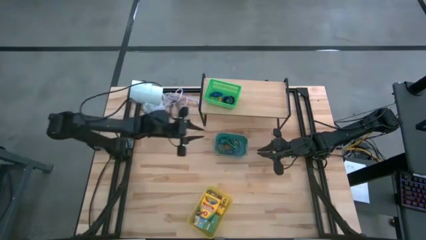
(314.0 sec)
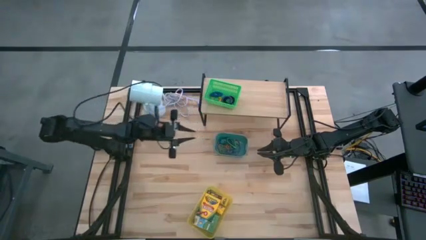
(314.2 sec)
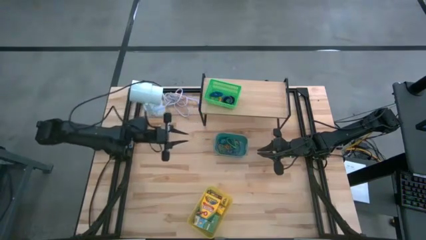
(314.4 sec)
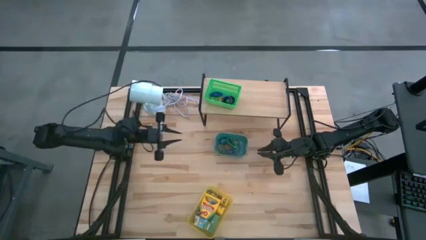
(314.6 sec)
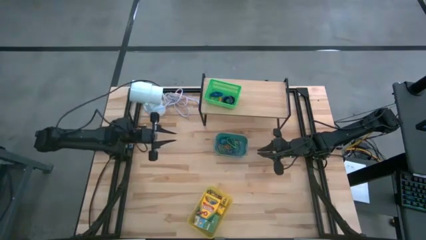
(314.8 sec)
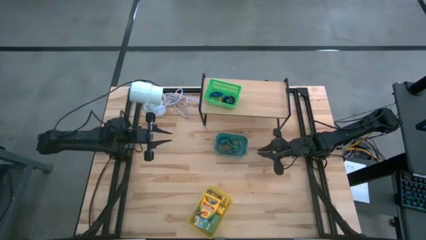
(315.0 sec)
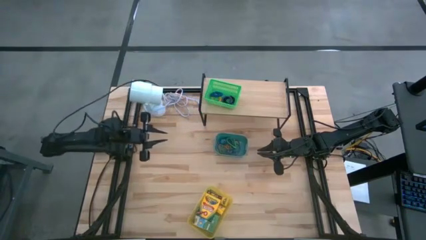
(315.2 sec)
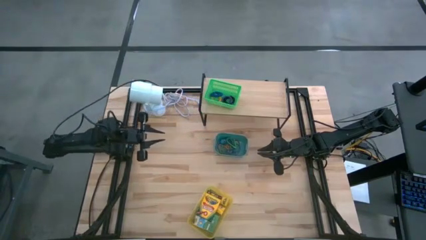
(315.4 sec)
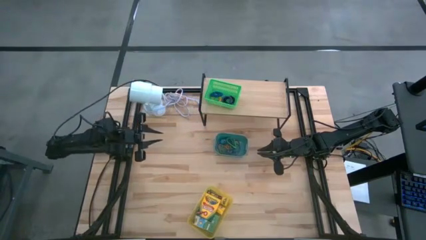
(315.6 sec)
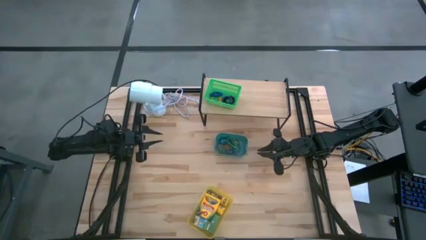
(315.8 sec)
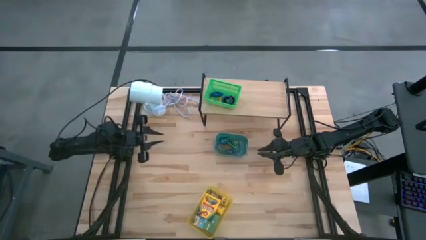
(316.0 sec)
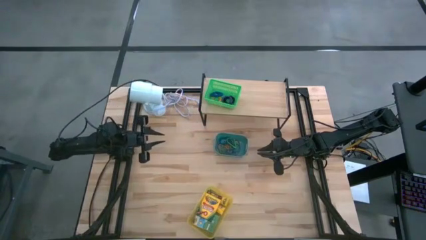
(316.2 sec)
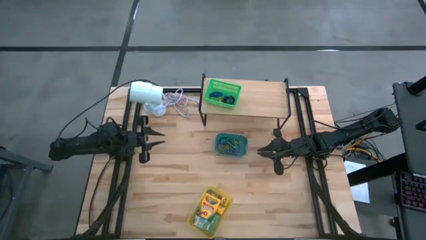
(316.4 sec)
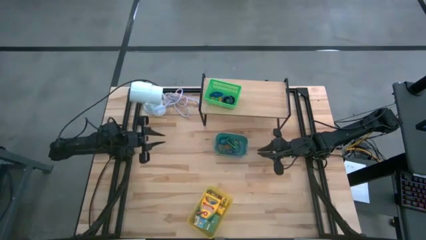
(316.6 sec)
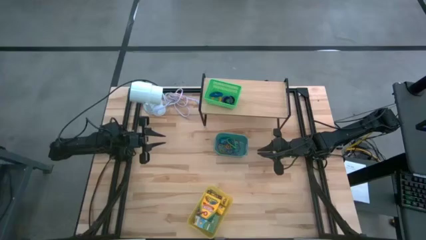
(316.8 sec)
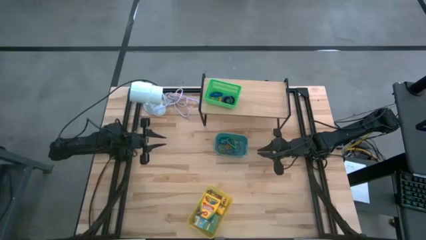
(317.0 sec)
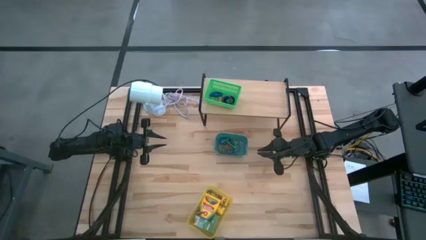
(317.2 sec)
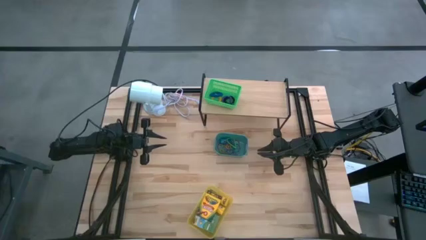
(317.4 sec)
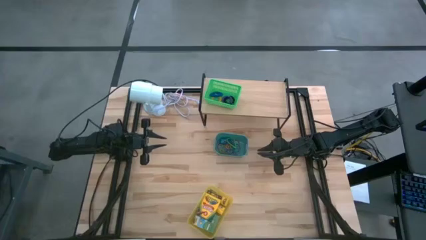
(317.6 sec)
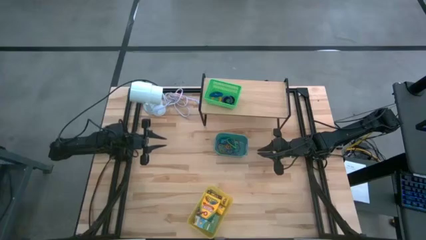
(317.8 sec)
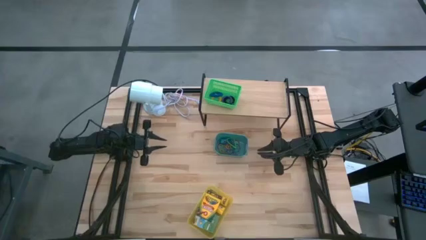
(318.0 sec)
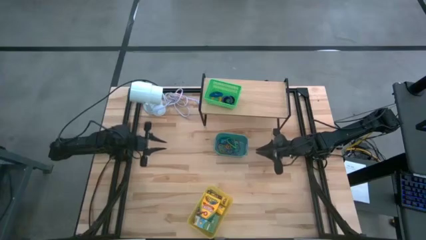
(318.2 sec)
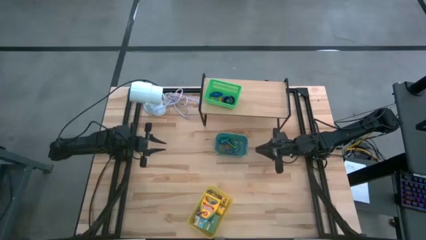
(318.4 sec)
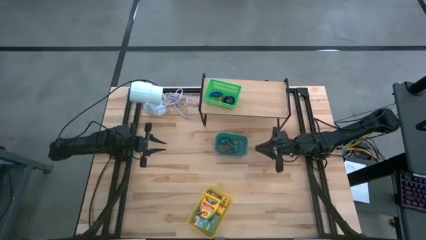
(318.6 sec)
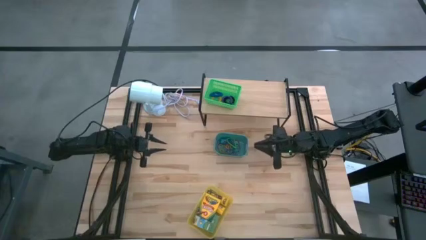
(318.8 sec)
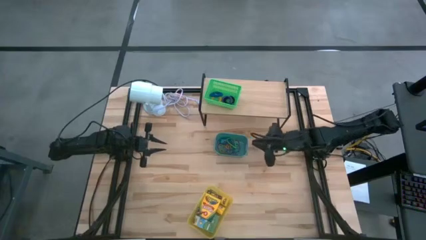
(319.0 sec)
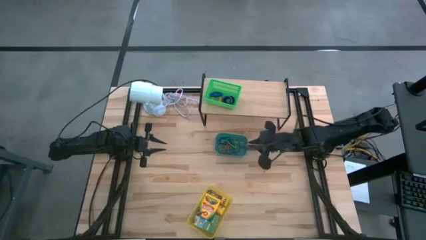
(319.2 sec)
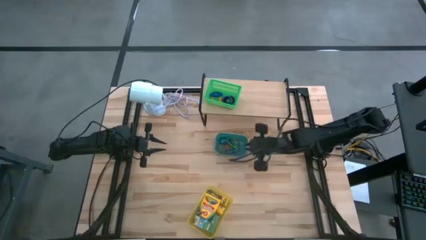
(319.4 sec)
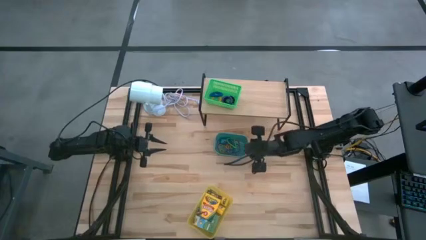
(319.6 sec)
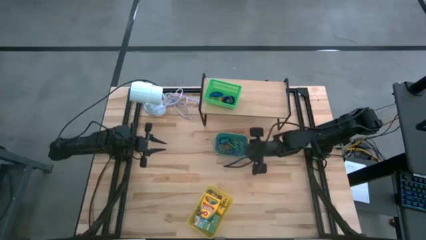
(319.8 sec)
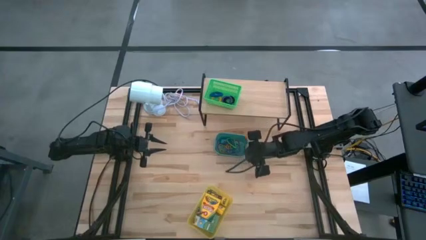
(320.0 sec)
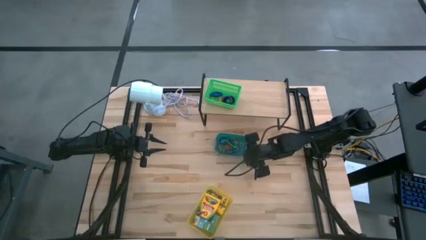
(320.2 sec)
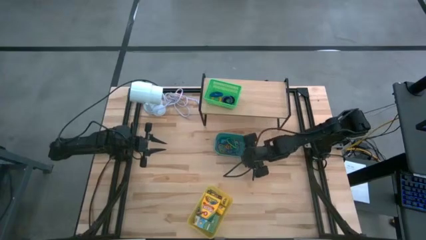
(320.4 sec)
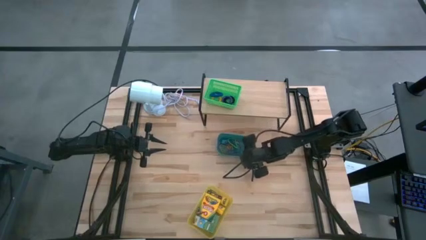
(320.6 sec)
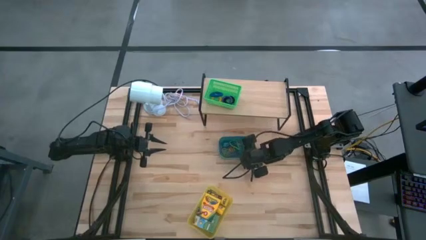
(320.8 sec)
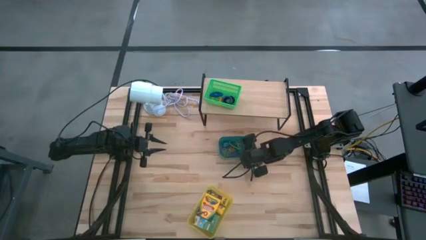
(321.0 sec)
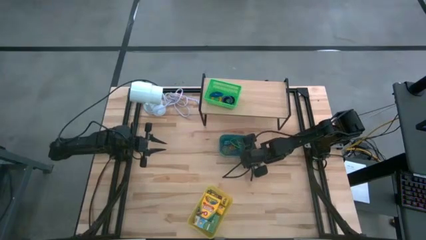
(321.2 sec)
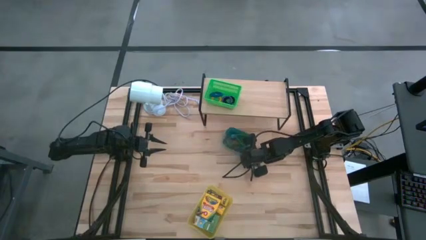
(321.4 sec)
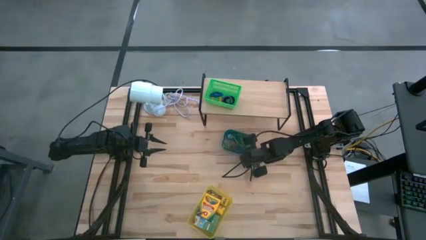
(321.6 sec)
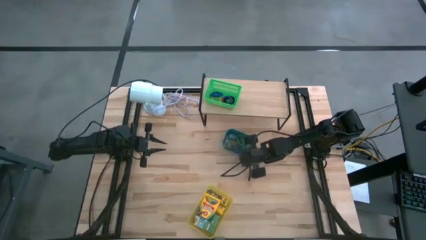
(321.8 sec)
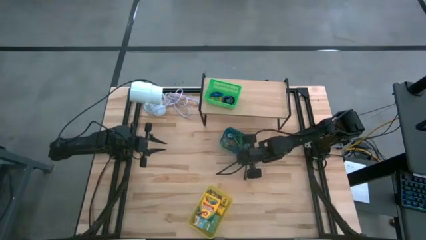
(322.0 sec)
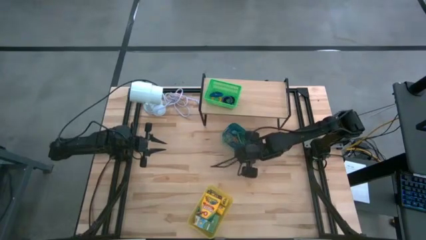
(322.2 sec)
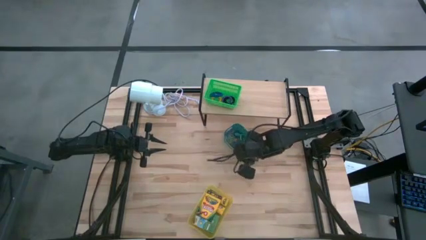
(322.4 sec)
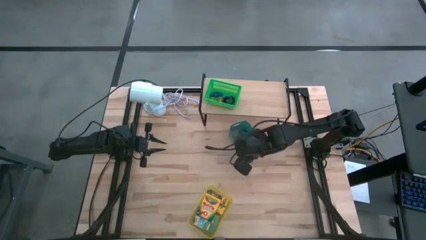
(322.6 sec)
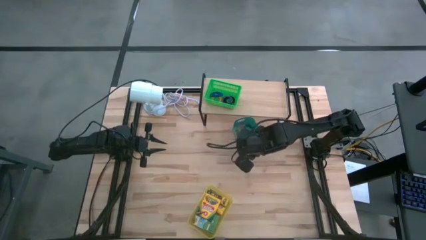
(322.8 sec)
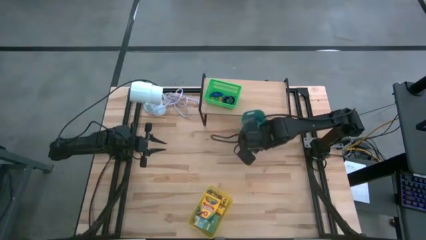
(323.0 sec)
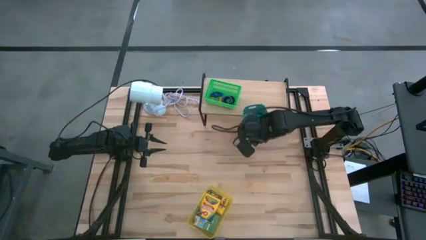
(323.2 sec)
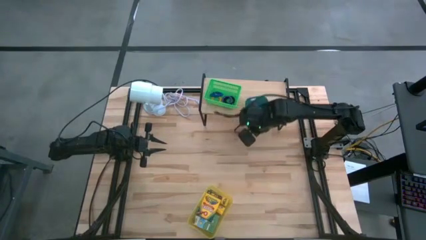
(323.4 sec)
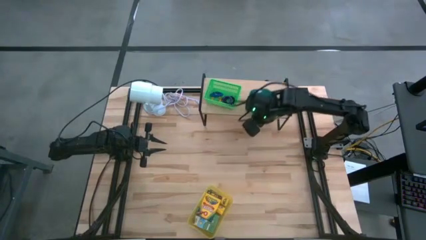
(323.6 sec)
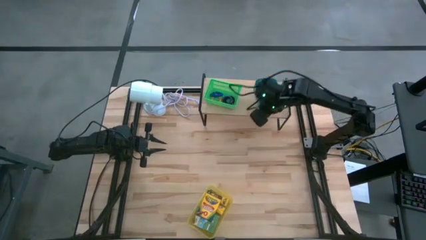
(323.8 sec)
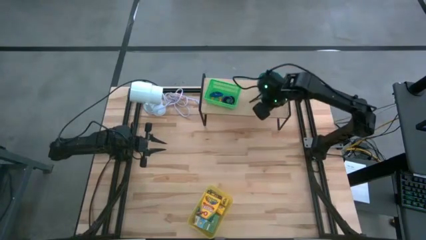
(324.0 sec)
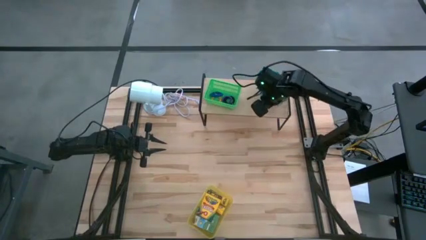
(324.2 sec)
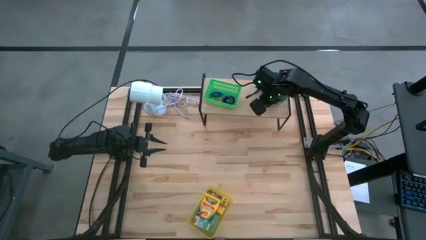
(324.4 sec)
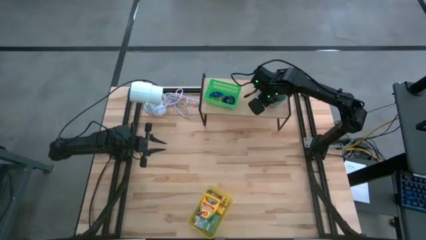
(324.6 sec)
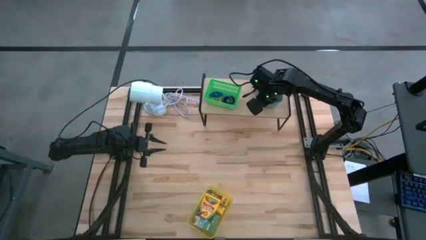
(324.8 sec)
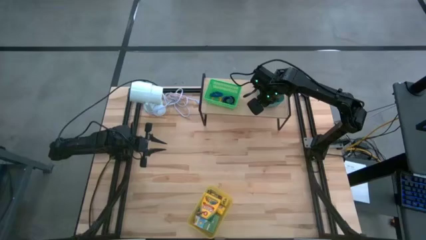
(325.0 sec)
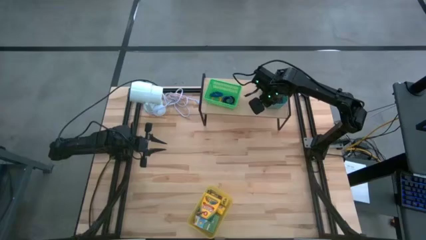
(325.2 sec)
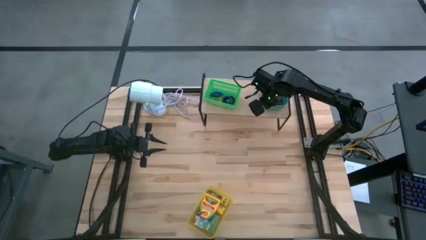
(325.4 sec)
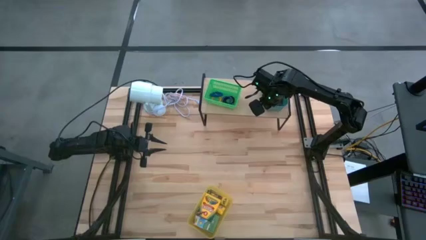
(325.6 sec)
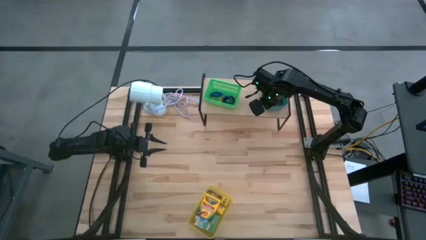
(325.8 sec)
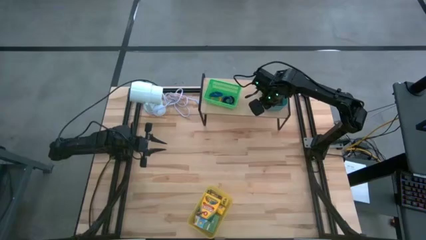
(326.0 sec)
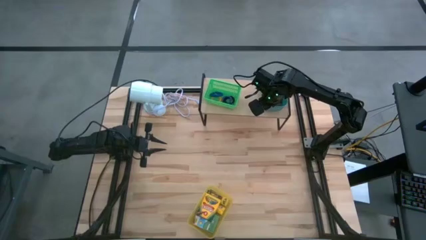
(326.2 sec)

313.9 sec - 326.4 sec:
Task: Pick & Place Office Desk Supplies
Put the blue bin on the shelf
